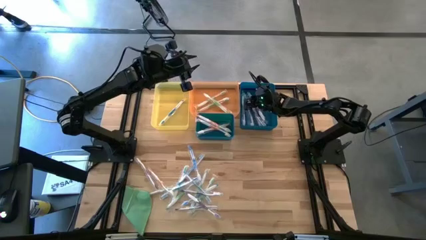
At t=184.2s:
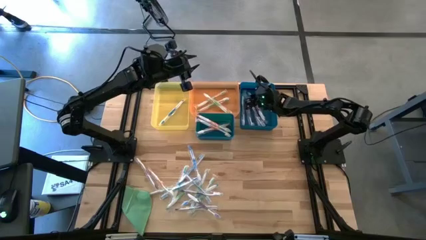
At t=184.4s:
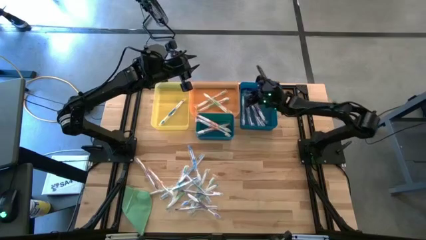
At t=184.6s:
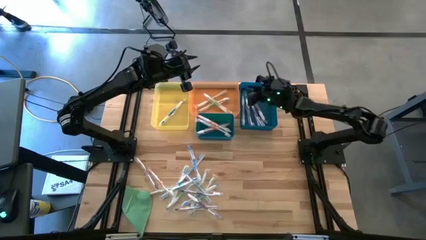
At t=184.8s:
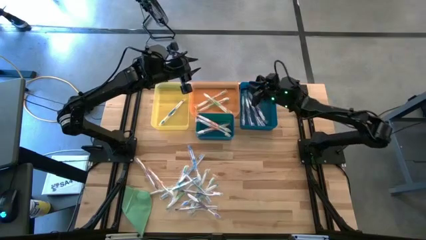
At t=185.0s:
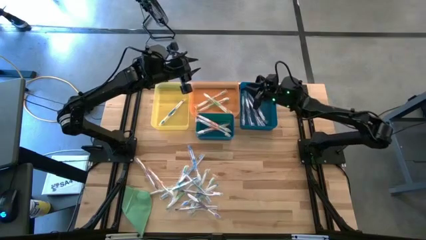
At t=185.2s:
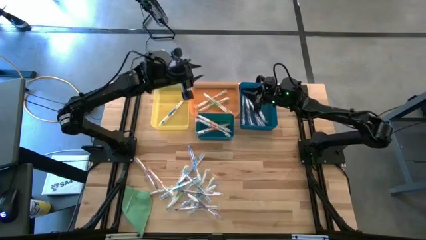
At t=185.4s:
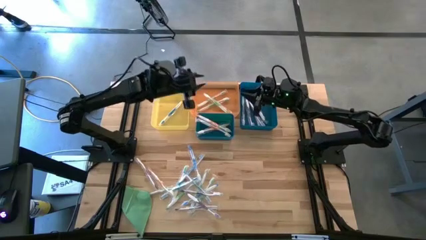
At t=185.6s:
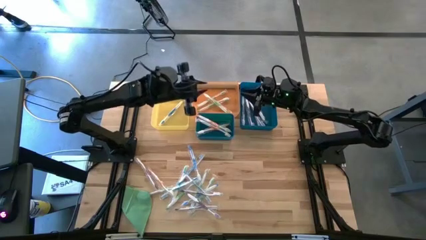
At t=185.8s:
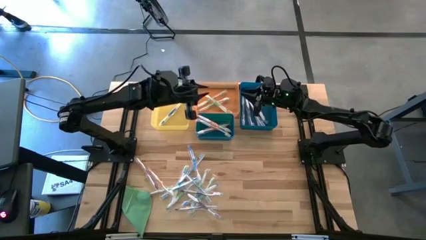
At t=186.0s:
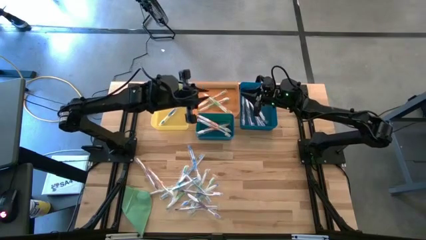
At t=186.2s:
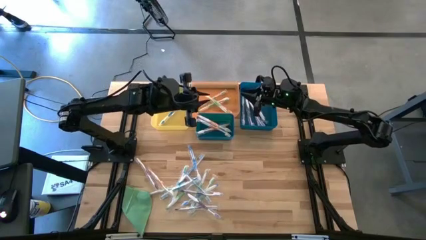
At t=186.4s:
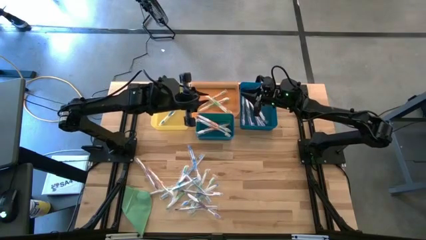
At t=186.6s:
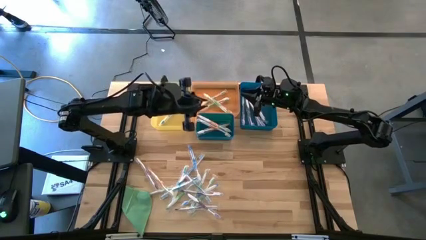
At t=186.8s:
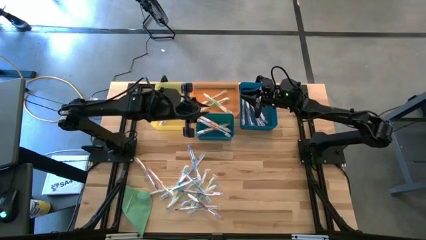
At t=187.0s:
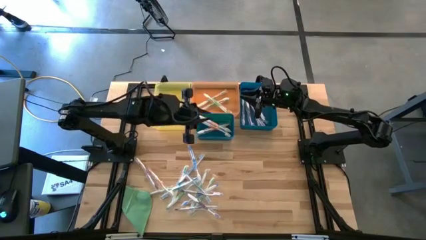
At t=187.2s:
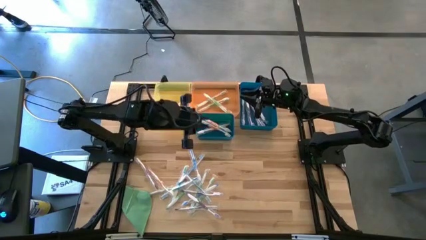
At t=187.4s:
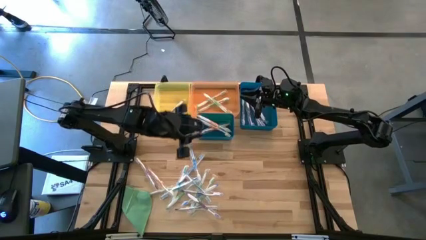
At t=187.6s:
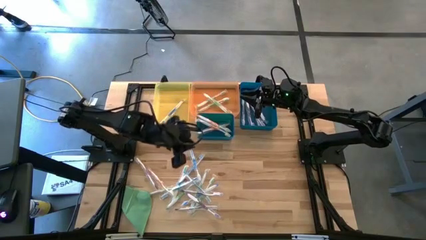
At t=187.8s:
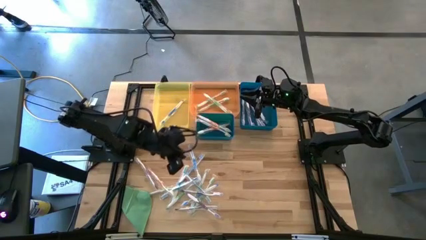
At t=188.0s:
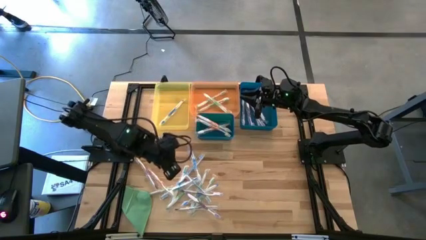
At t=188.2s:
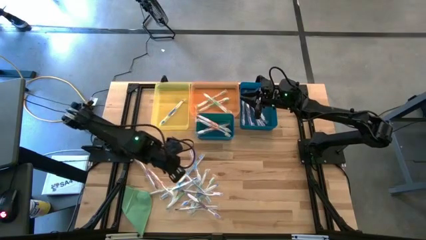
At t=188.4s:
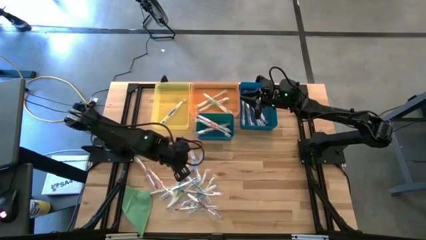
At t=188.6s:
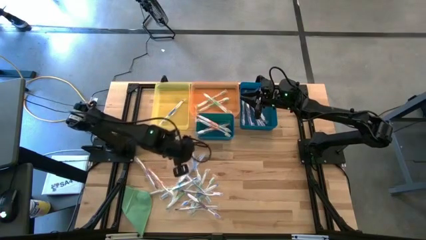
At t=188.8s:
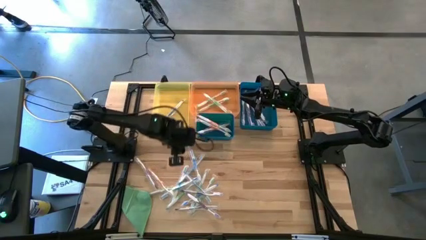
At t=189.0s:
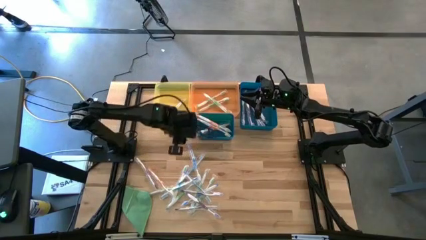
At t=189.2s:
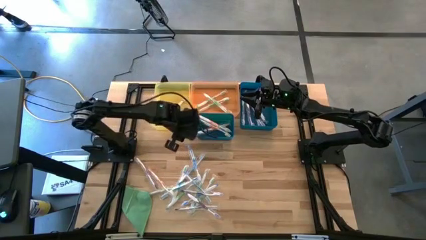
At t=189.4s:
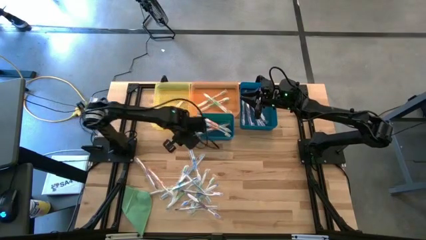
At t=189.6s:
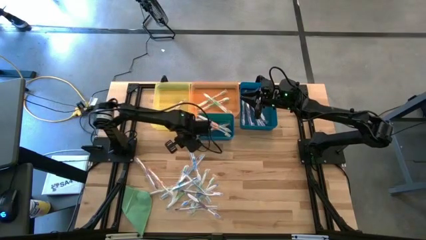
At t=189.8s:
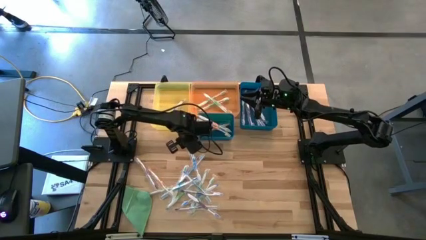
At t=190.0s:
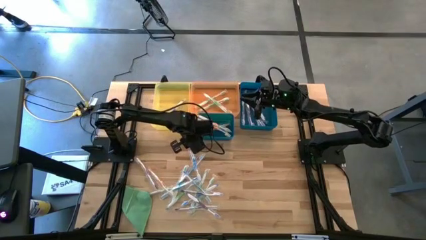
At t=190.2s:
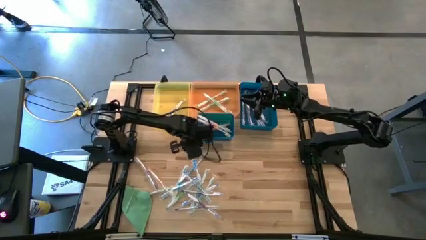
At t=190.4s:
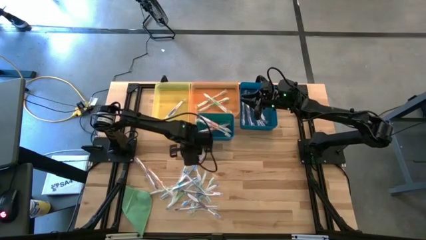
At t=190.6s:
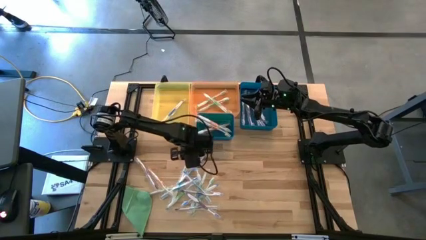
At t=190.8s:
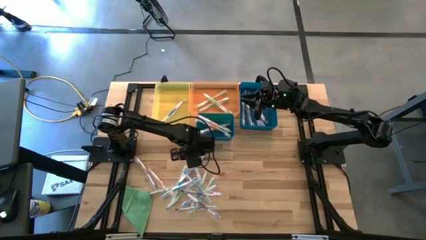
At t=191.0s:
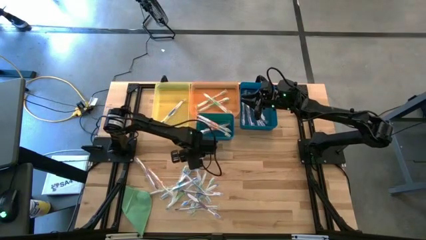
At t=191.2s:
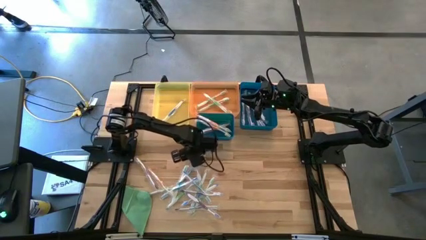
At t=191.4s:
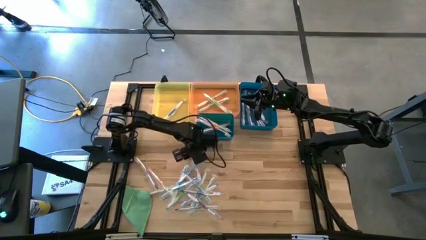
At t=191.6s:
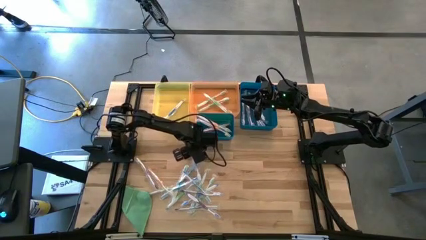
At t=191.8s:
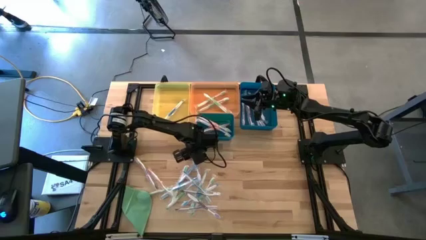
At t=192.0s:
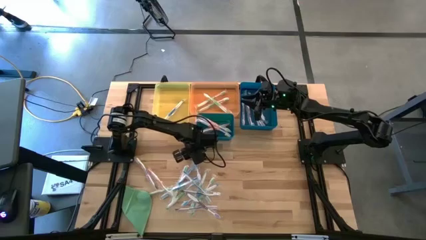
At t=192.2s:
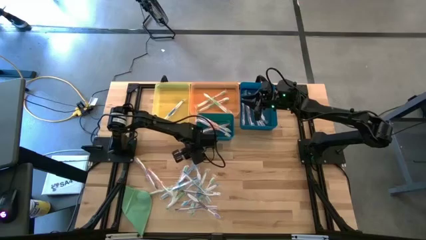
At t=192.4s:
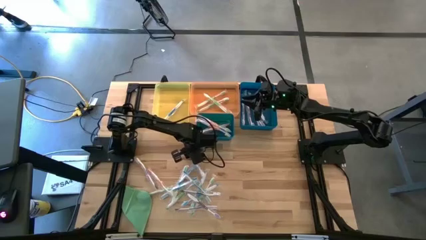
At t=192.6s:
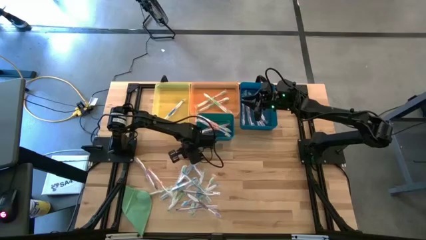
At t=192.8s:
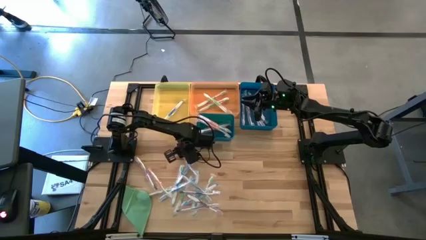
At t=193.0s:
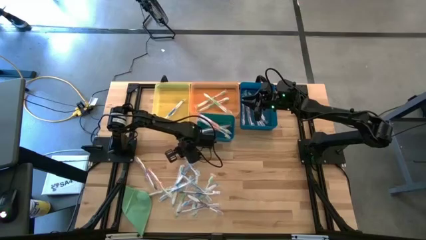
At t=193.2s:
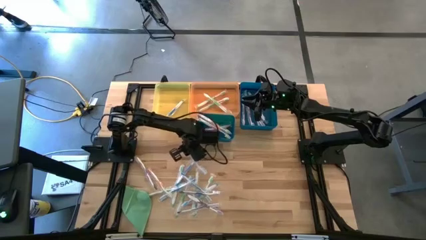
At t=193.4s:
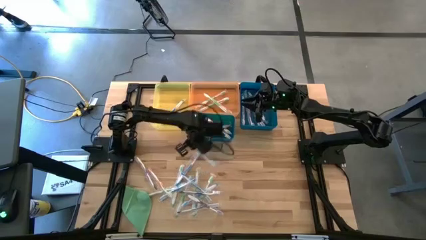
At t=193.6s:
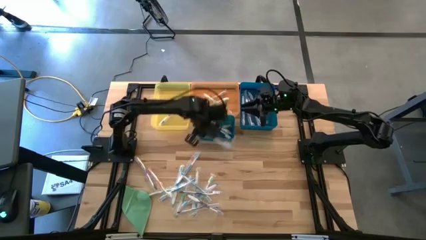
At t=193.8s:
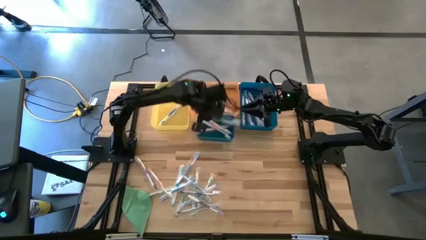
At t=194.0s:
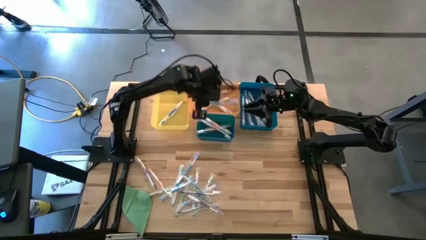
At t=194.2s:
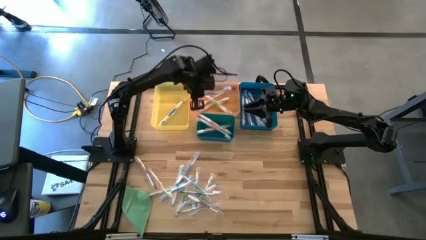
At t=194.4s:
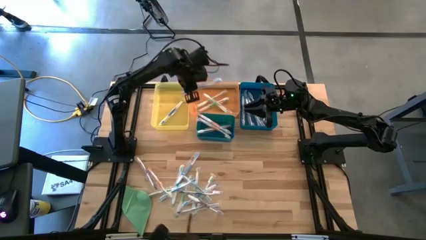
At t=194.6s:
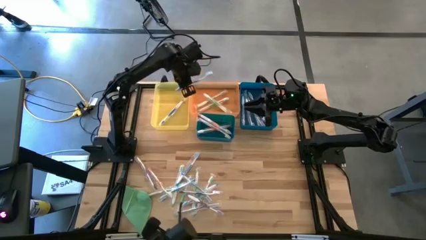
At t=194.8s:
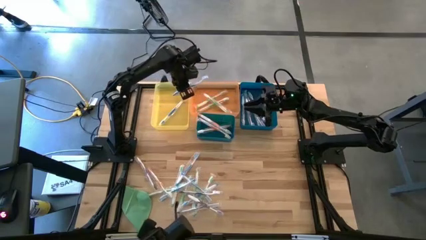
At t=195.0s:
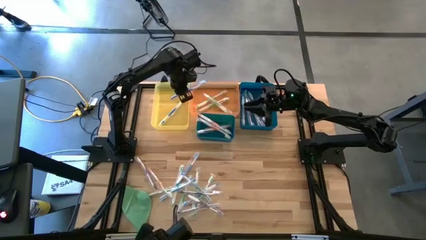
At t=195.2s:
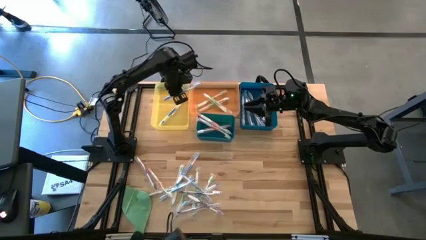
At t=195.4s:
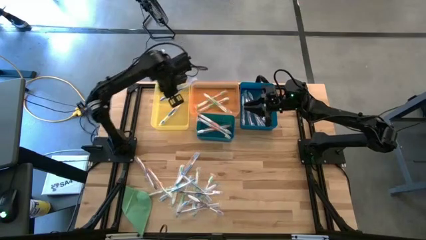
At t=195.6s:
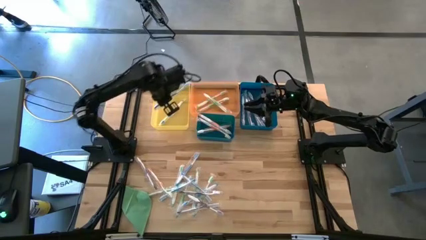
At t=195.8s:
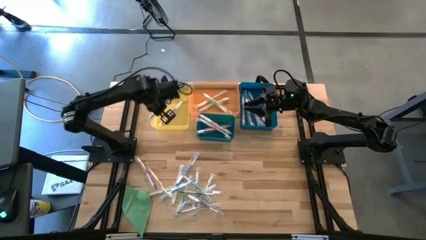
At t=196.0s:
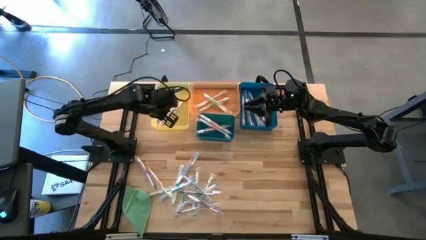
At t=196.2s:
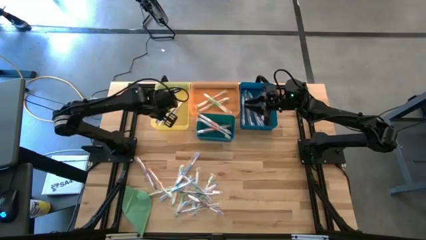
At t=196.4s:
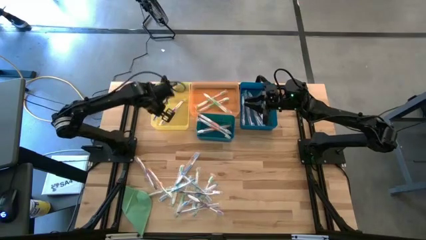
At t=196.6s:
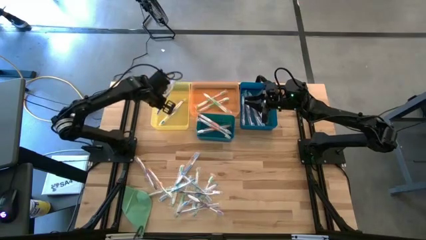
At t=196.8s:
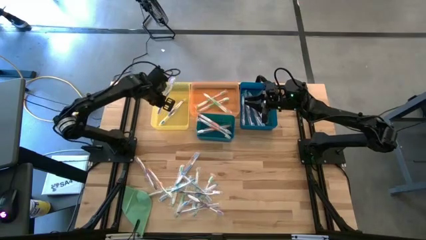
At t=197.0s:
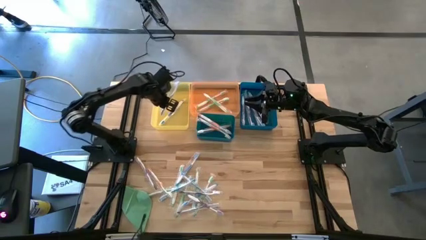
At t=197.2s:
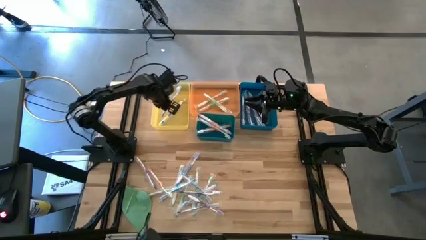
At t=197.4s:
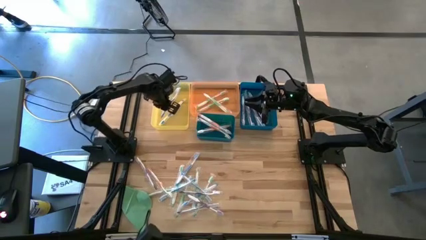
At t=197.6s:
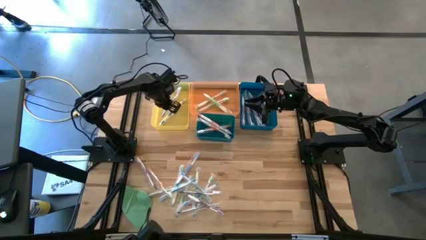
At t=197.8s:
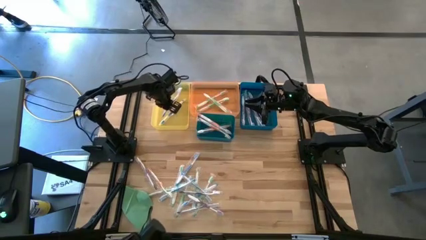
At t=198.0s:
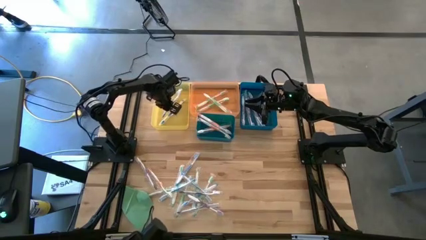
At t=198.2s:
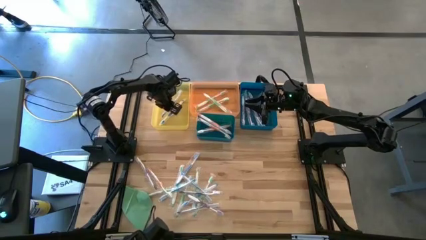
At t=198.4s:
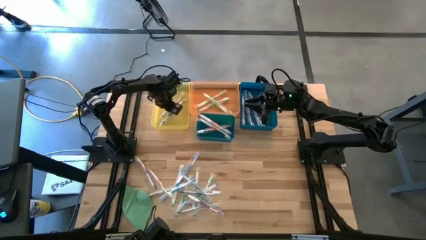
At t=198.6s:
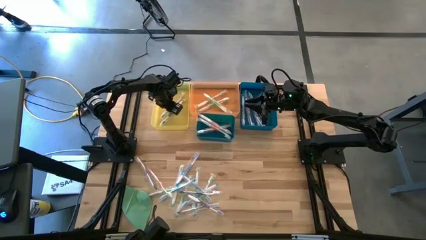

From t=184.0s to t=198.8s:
Task: Pick & Place Toothbrushes
Put the blue toothbrush into the yellow bin
